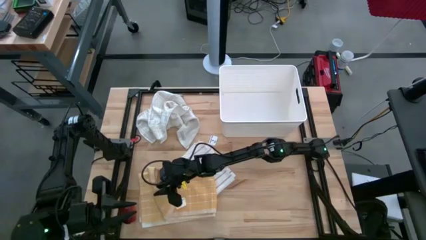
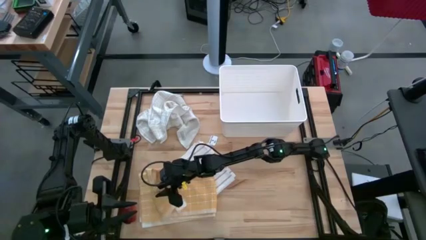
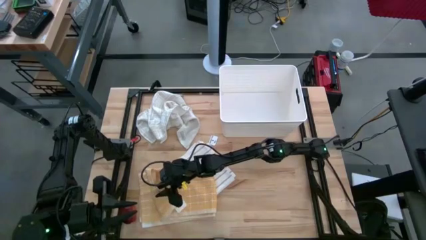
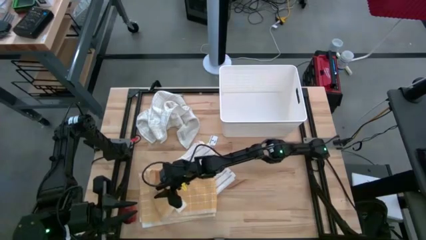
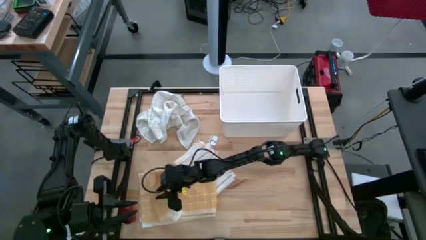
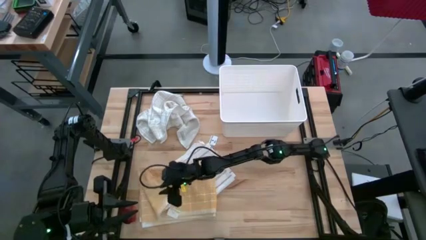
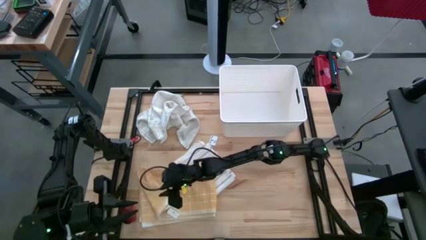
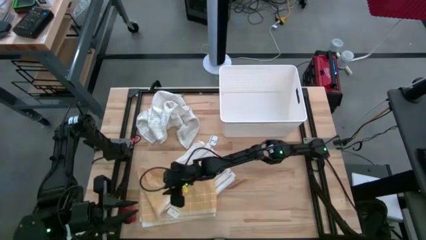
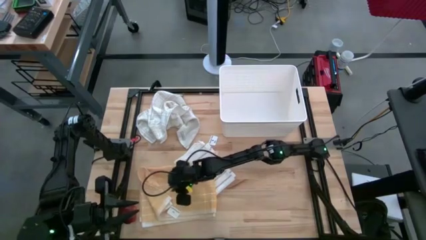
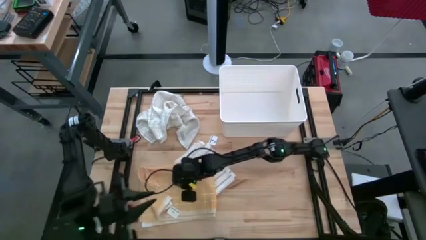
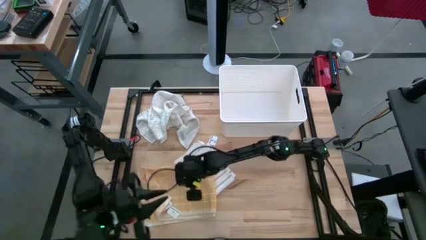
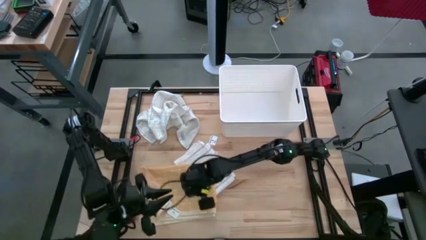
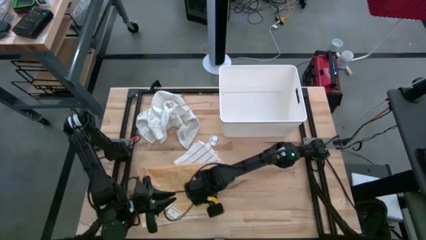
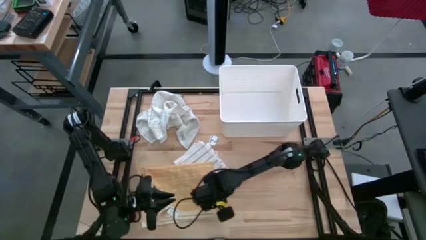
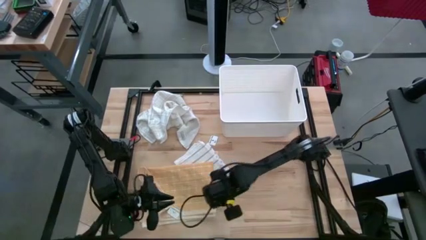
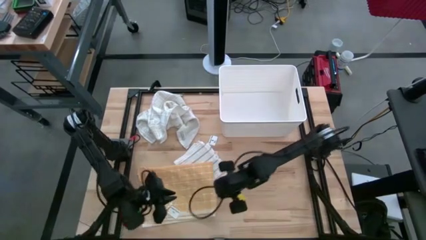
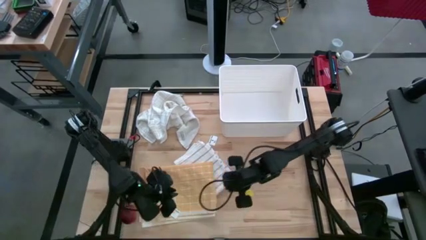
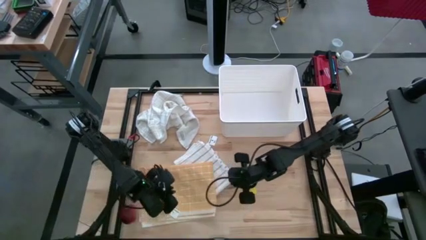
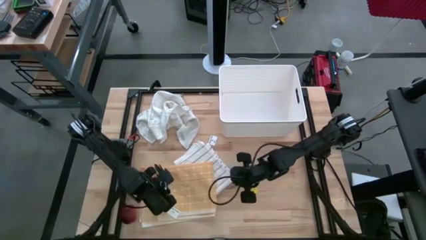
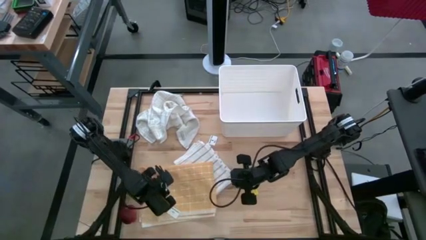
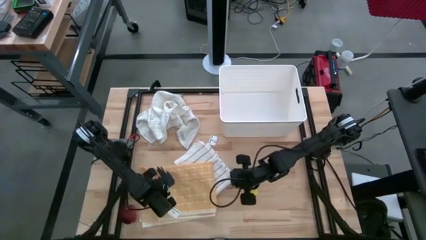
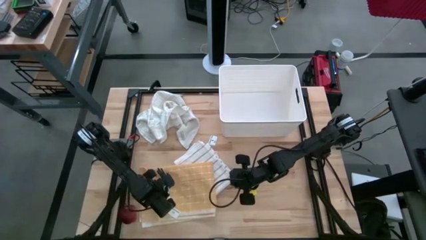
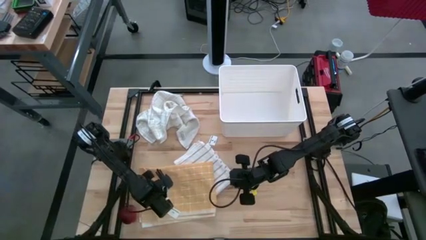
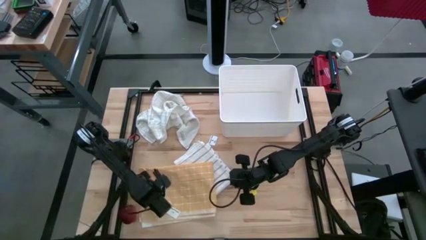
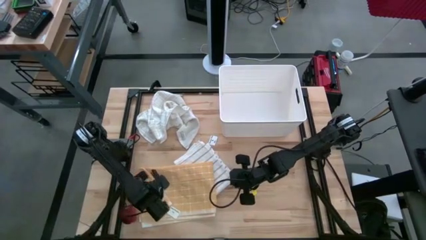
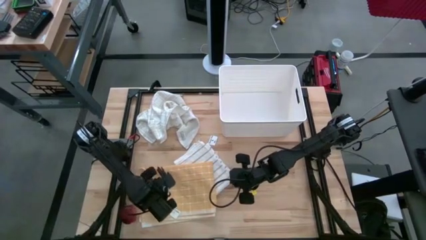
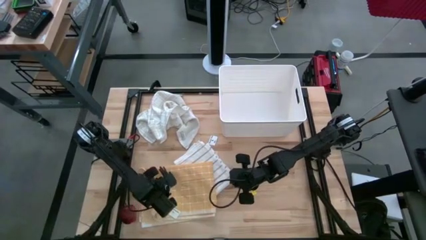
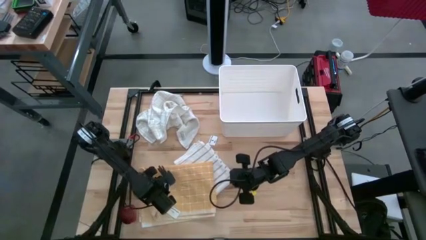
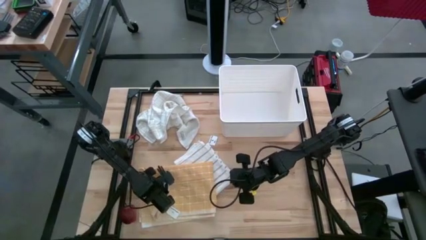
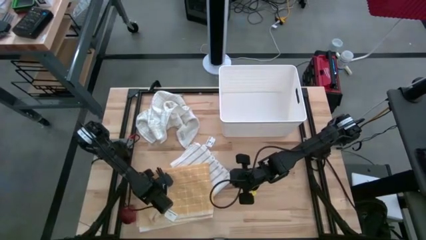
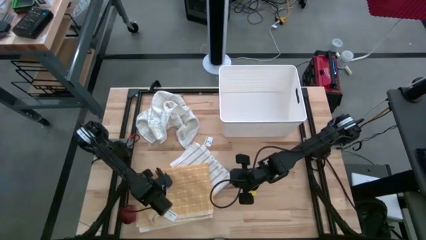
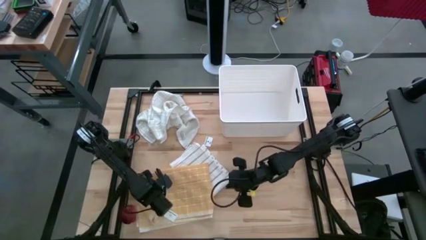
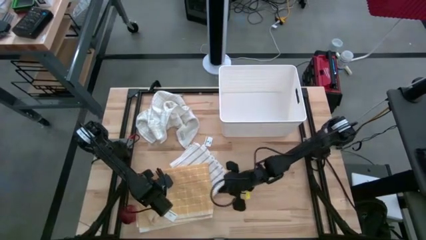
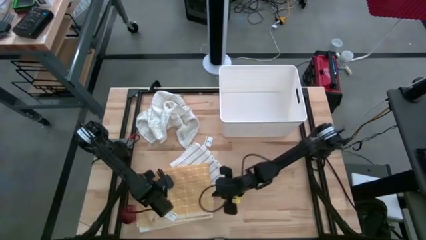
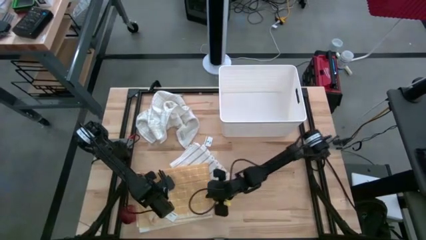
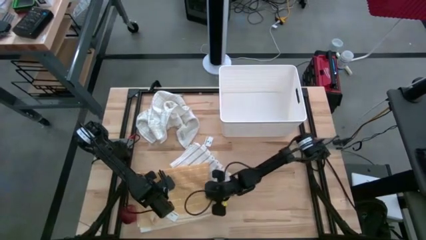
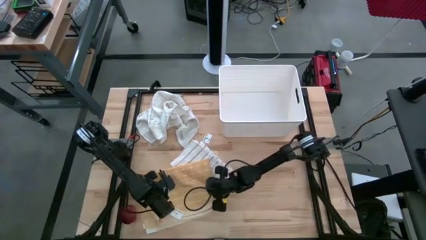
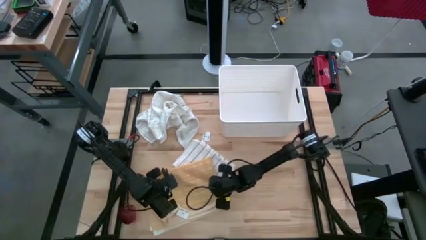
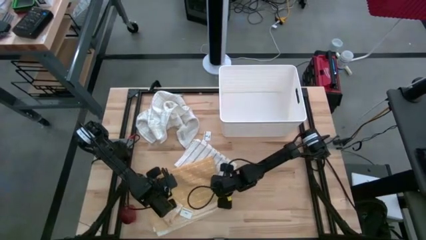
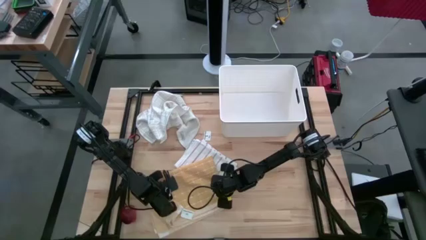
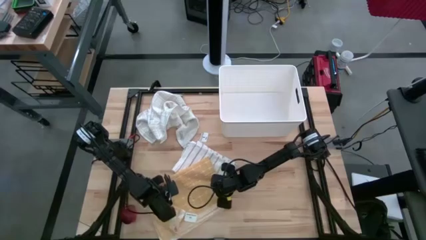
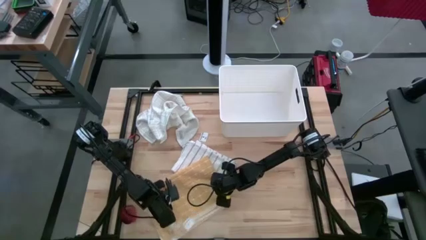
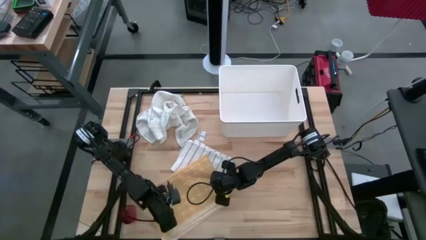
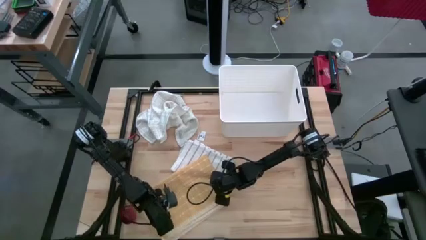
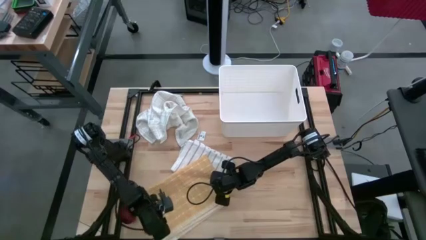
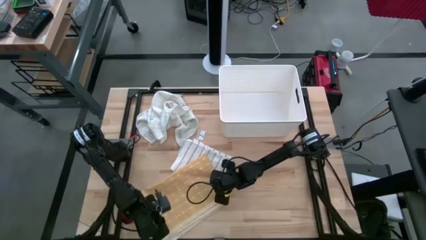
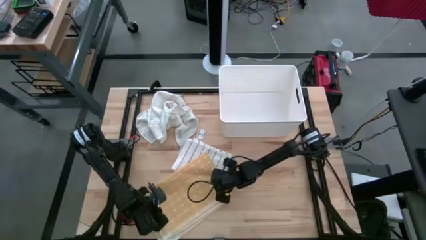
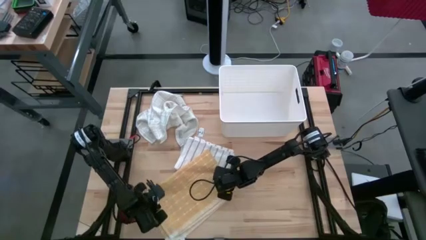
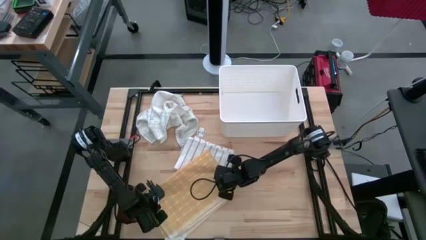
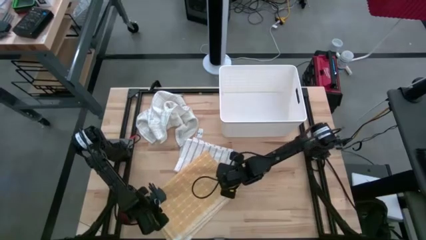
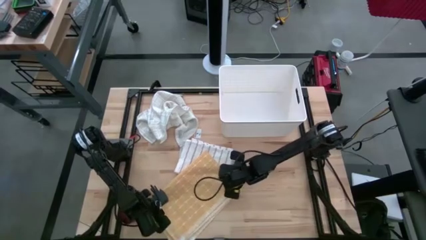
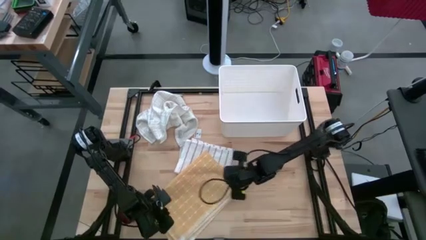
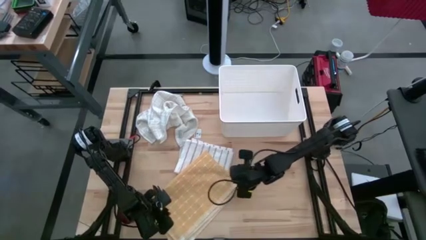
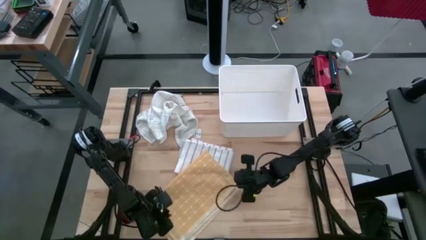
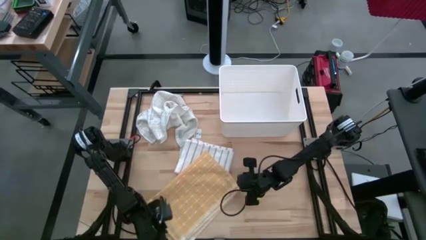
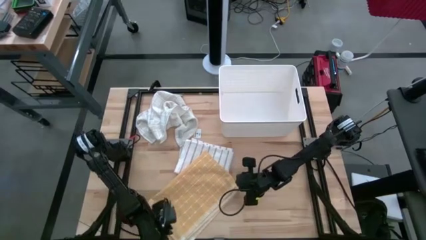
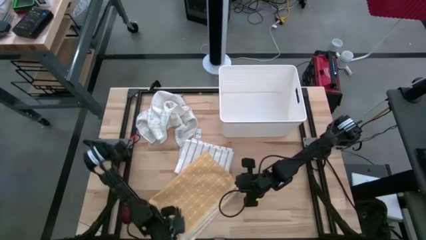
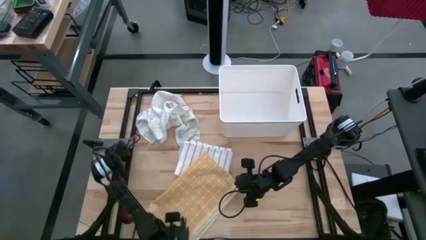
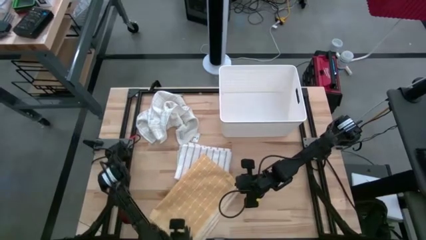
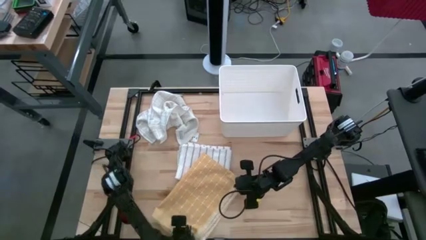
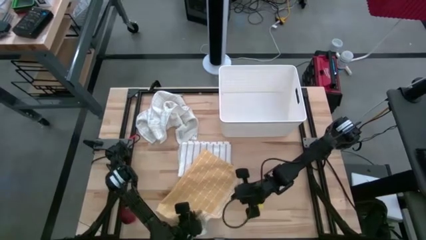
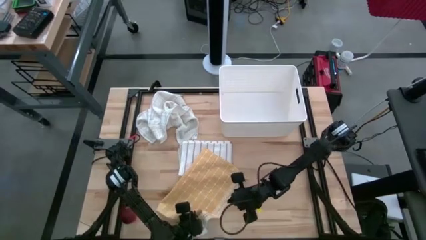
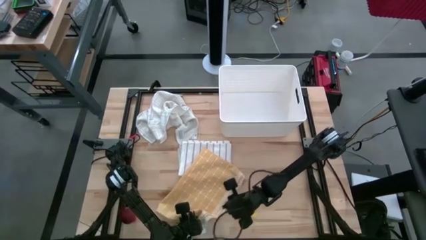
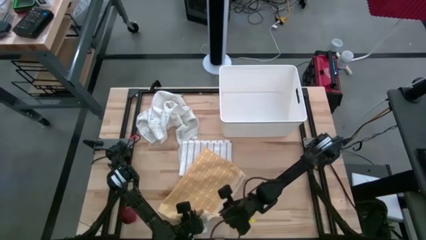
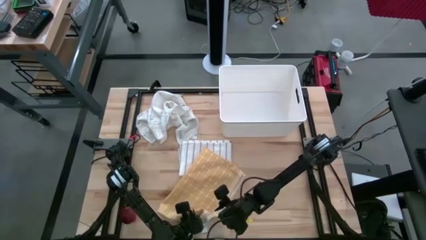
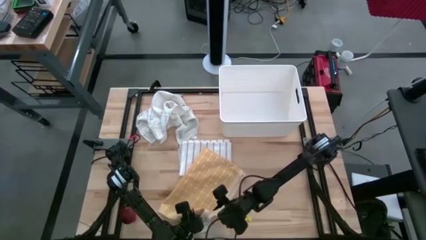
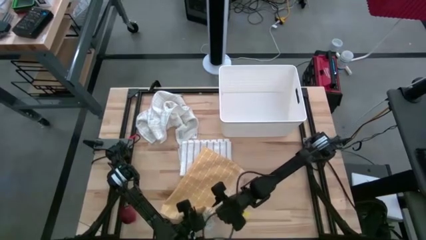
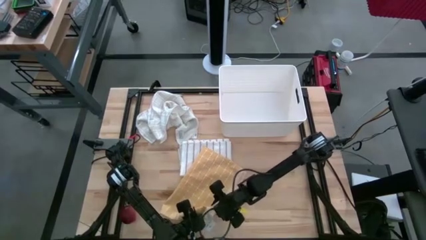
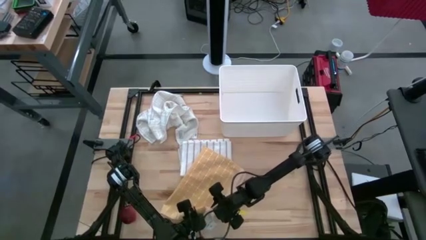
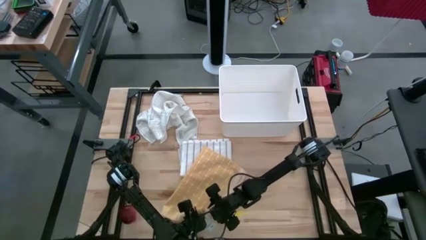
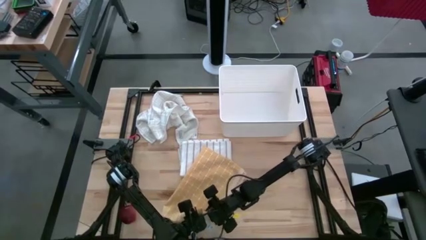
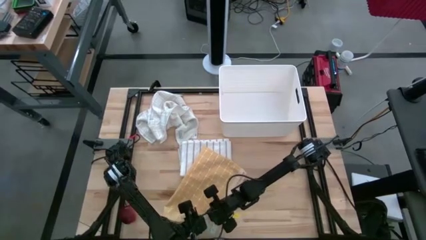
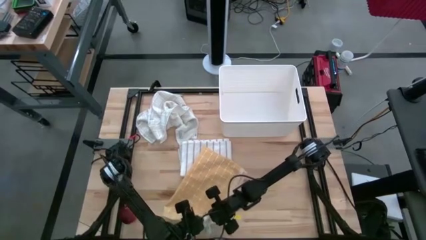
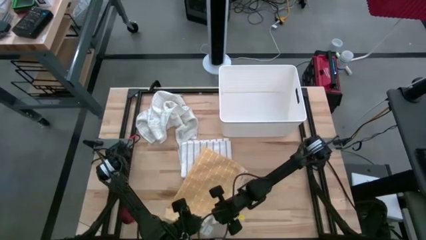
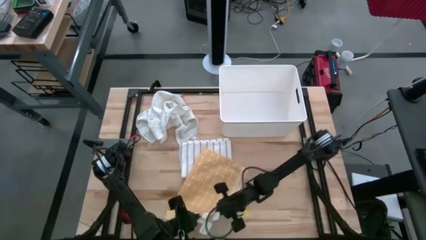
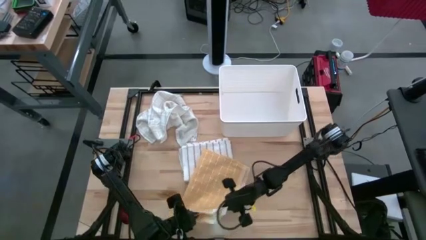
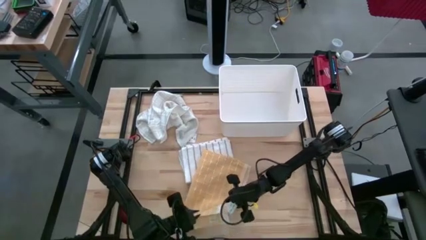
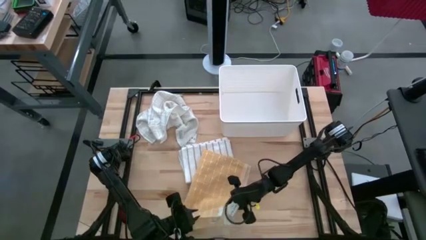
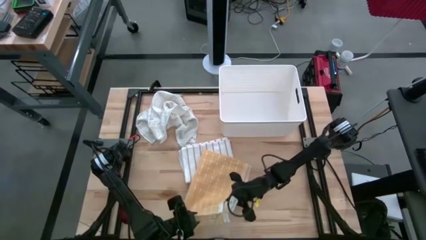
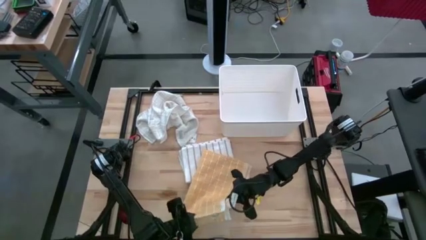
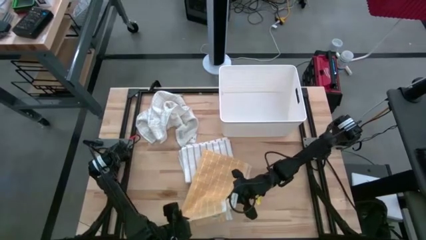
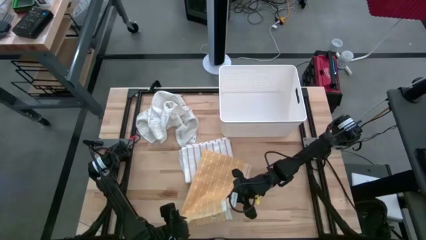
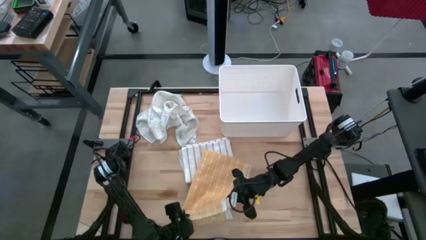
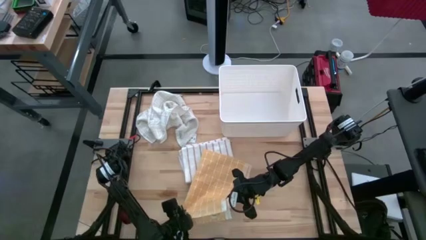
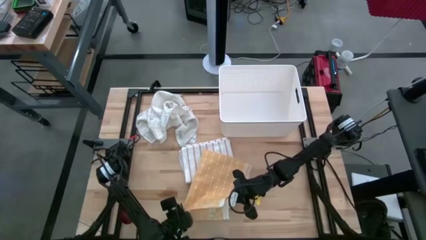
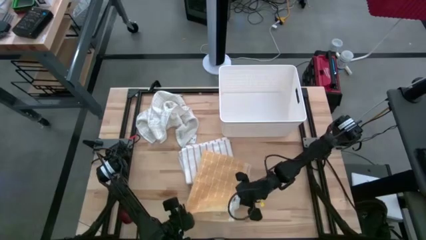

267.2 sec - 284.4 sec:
Task: Fold towel
Fold the yellow squared towel
